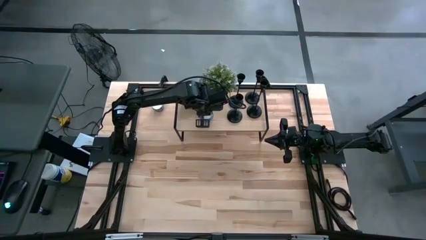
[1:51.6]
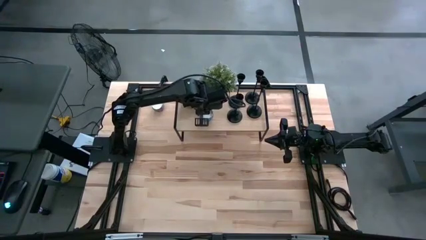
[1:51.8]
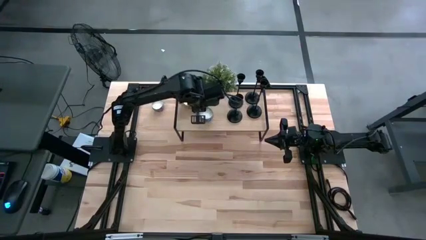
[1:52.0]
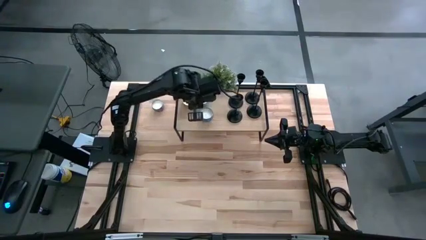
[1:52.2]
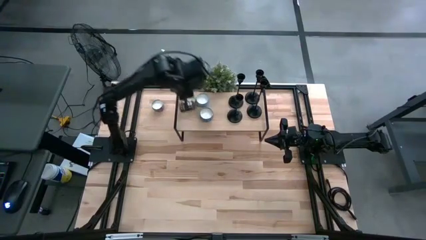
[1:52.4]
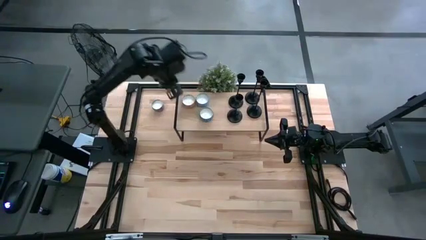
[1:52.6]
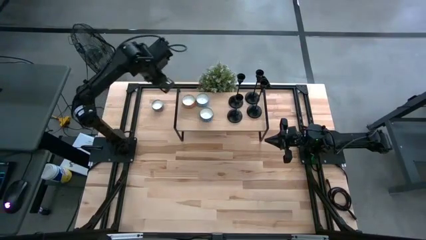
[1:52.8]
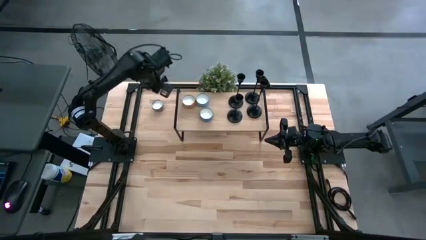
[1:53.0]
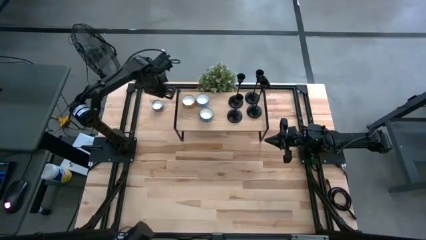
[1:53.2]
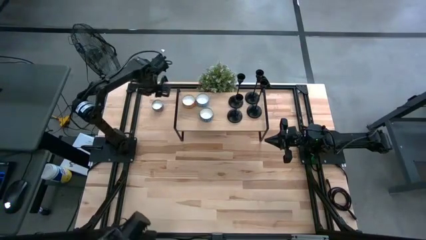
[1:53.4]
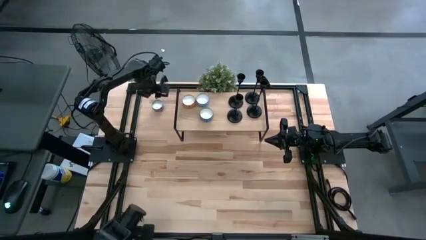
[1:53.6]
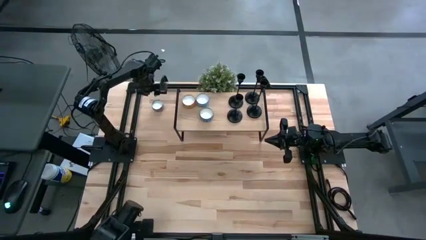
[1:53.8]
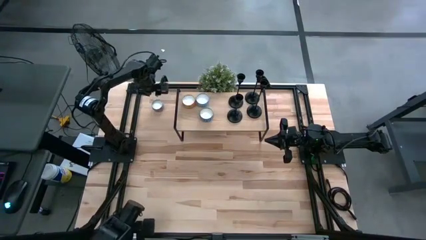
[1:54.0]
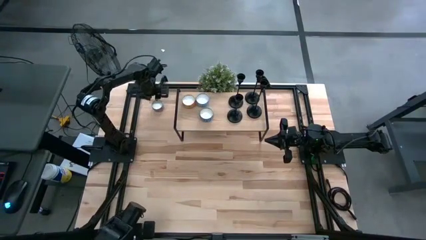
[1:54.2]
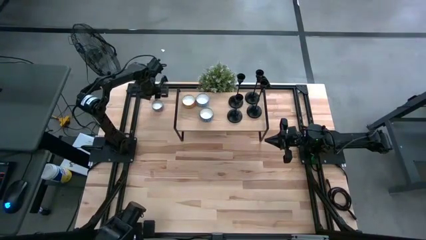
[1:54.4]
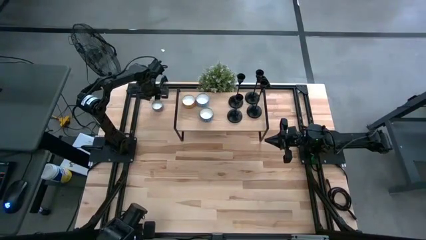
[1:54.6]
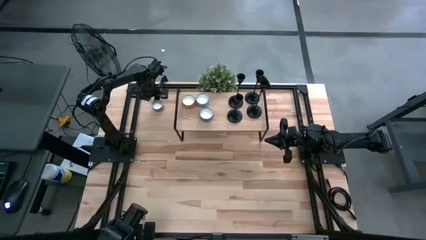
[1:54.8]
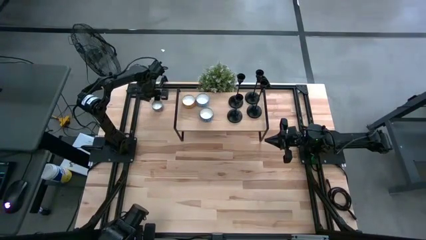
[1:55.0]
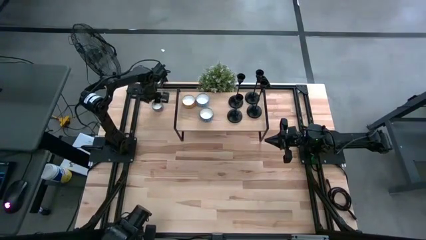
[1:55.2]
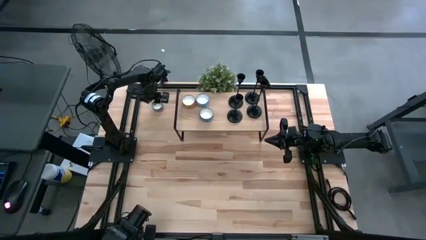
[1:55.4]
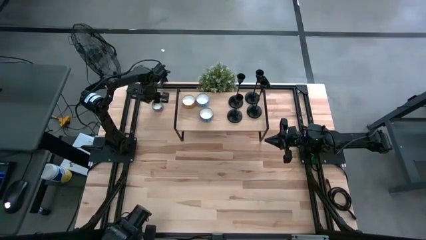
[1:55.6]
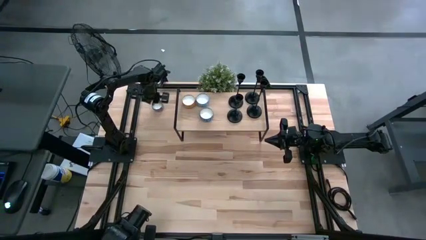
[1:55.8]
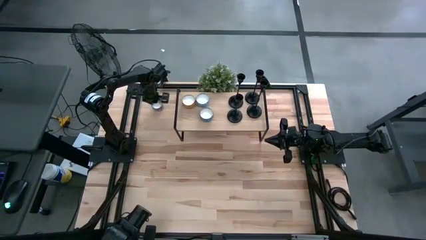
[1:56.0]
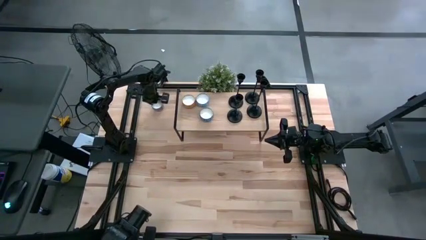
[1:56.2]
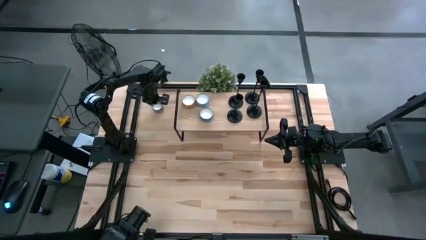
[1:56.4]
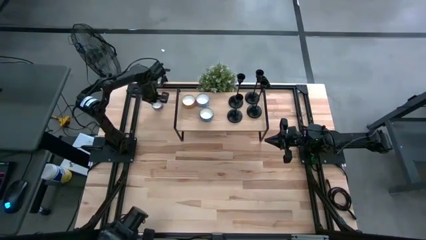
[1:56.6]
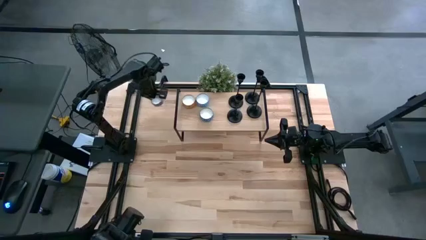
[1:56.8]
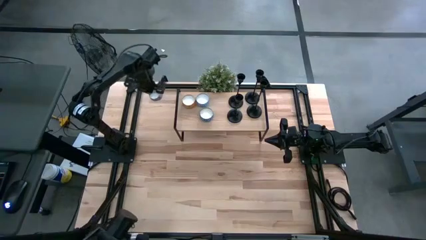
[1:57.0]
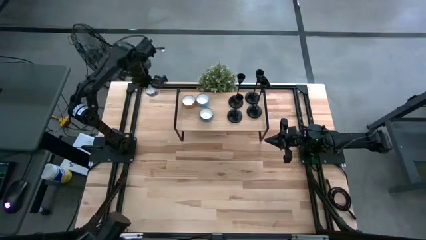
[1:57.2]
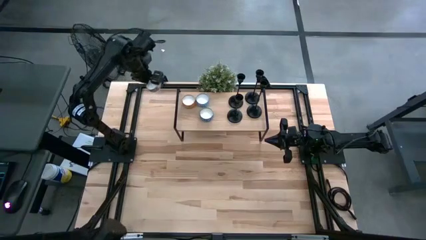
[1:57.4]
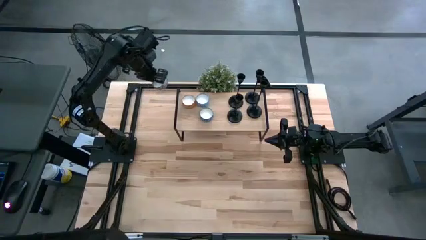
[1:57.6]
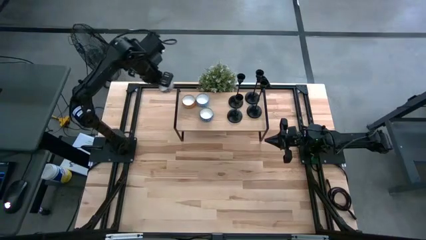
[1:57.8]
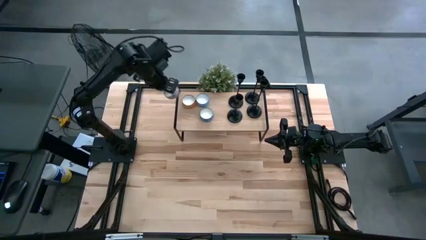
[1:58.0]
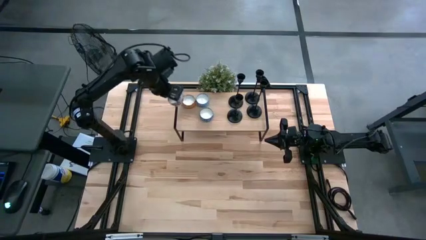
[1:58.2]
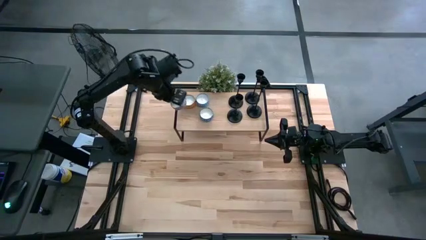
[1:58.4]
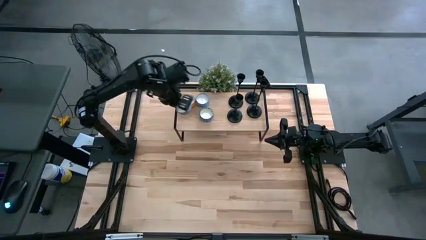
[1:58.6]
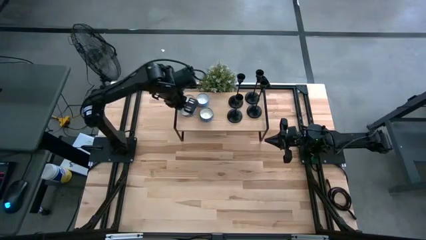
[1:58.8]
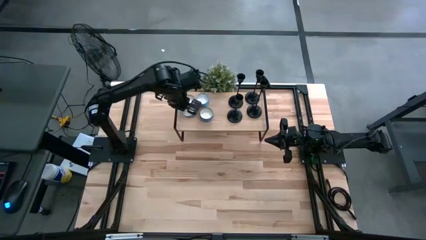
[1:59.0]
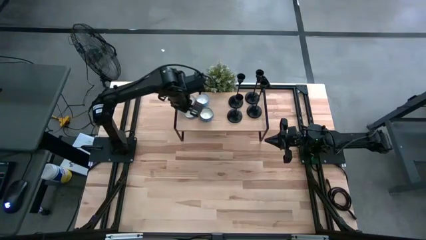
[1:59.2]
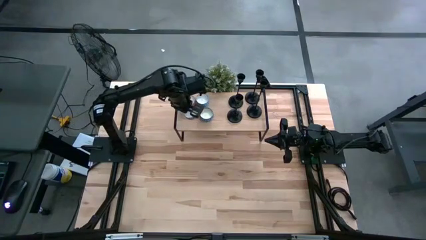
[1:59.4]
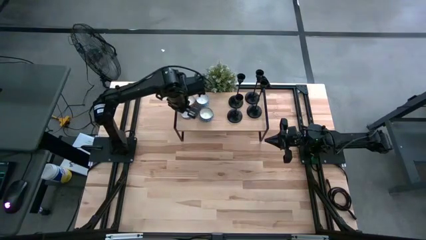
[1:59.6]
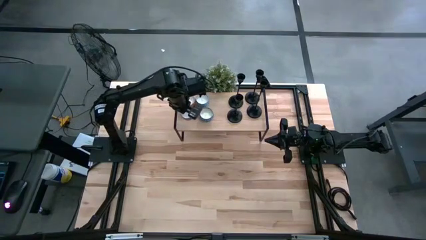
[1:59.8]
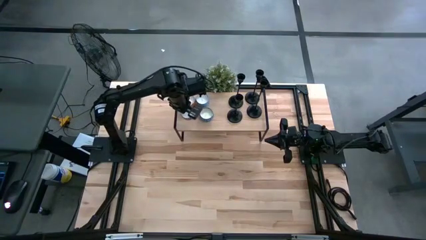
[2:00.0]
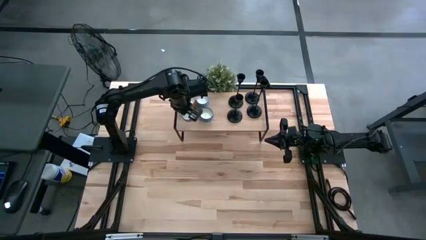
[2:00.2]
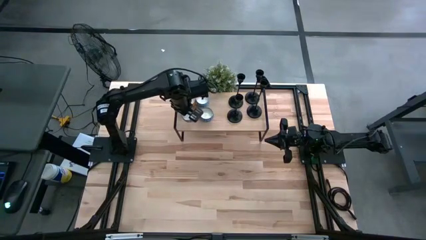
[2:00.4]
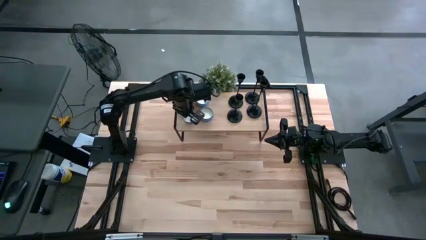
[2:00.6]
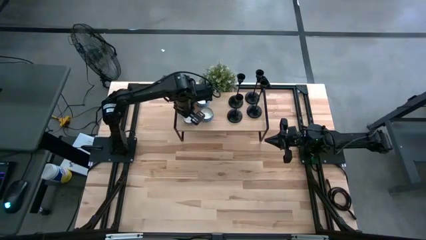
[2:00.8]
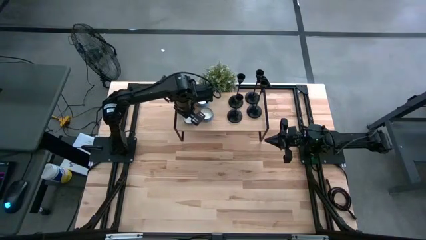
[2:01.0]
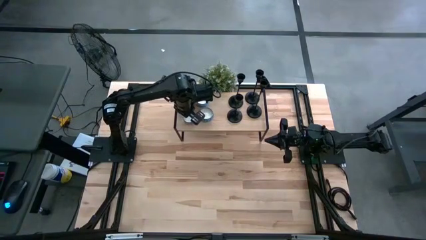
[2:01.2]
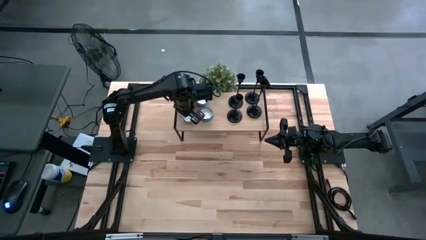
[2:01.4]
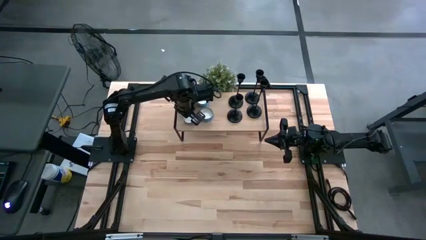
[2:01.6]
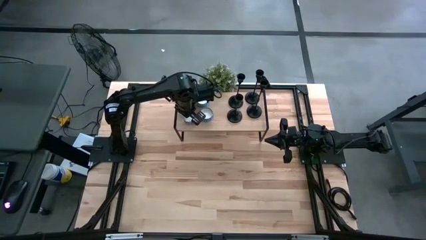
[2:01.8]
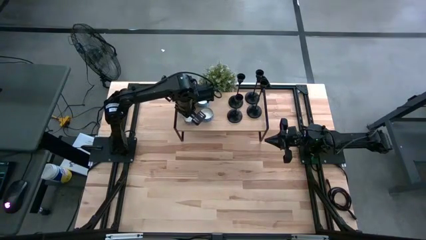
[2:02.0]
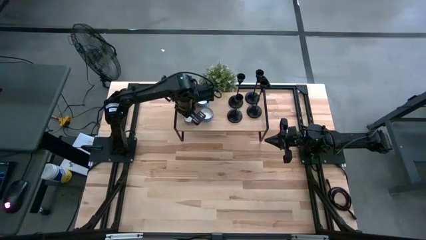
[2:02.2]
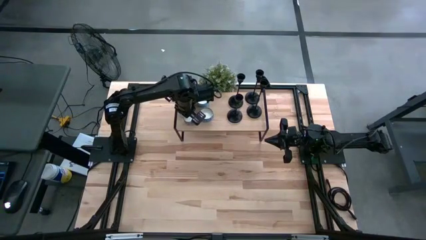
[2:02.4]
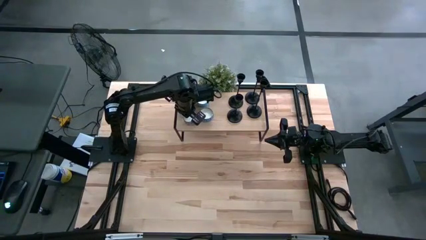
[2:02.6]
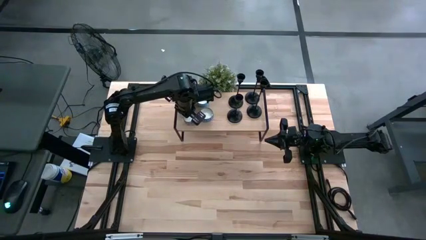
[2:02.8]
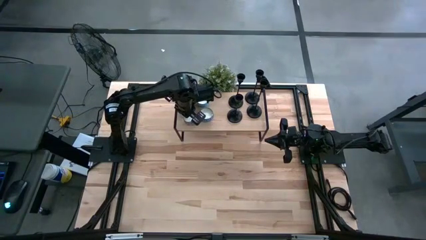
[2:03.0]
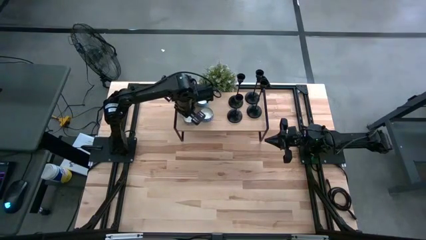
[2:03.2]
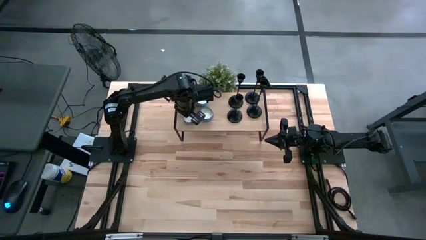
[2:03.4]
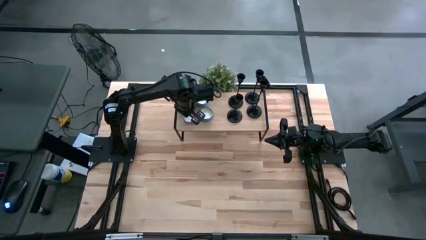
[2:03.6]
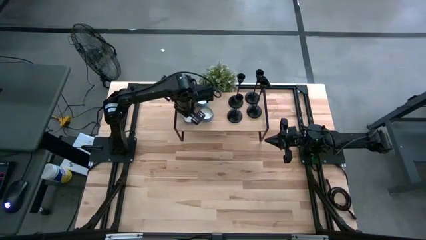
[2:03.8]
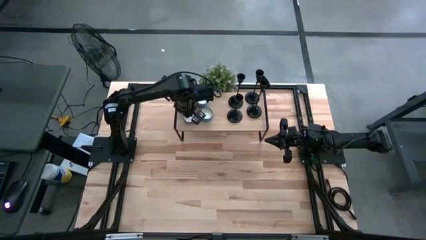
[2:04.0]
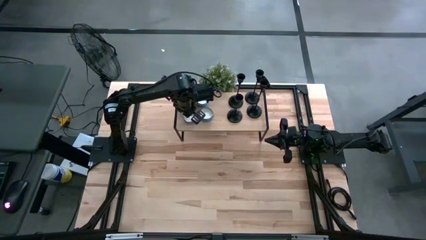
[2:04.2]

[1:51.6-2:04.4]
Task: Pick & Place candle stick holders
Put the red scented candle on the shelf

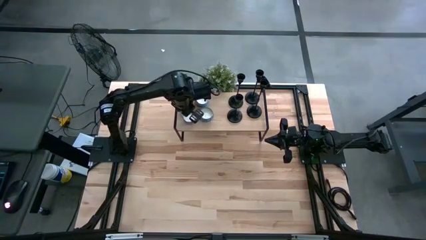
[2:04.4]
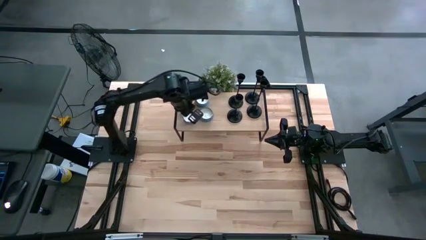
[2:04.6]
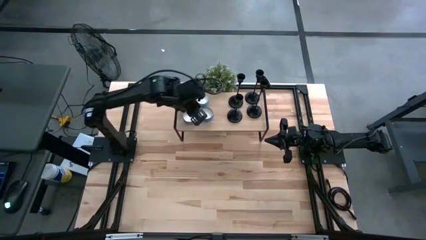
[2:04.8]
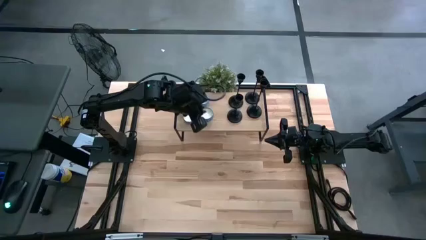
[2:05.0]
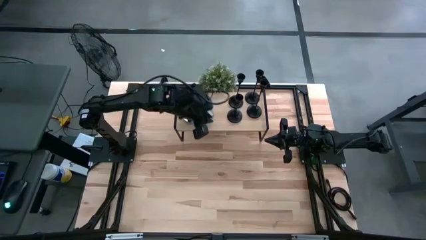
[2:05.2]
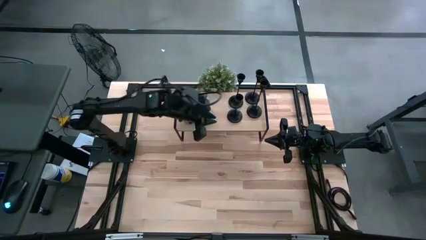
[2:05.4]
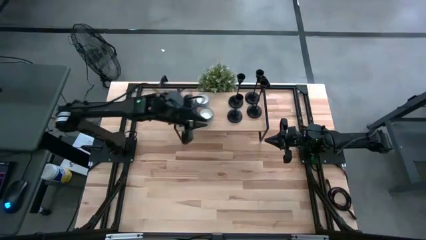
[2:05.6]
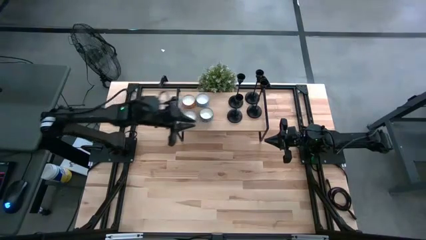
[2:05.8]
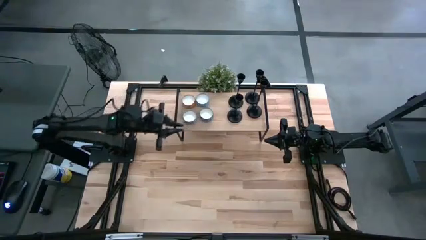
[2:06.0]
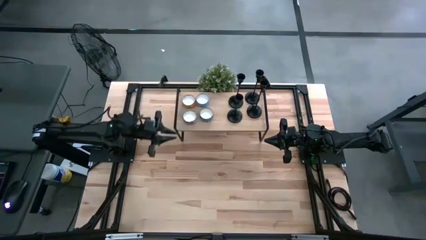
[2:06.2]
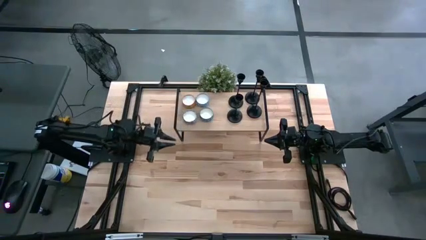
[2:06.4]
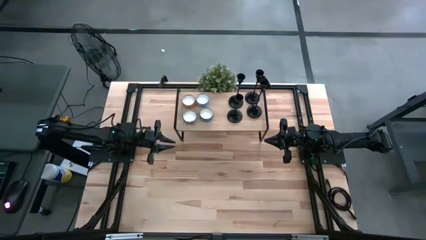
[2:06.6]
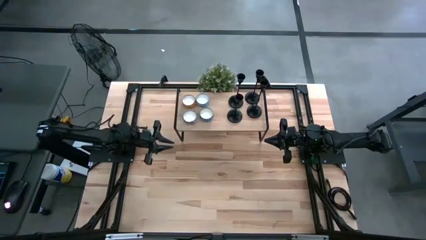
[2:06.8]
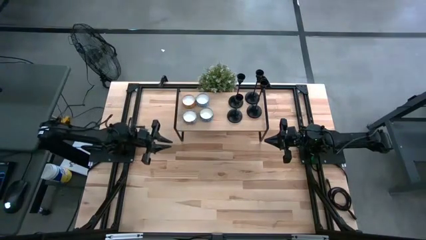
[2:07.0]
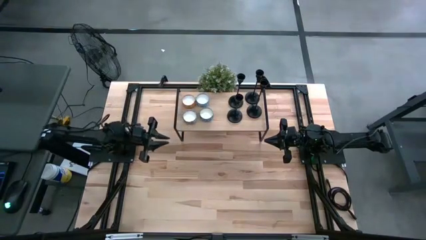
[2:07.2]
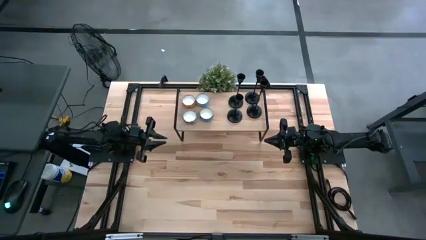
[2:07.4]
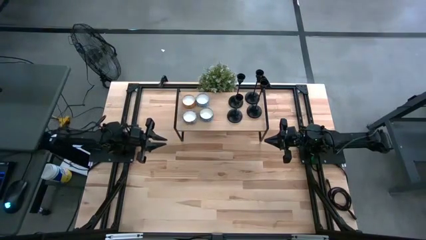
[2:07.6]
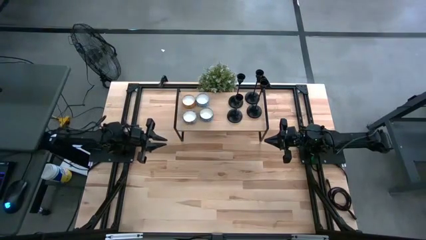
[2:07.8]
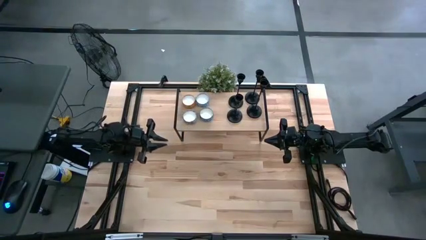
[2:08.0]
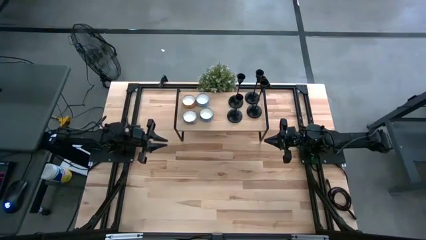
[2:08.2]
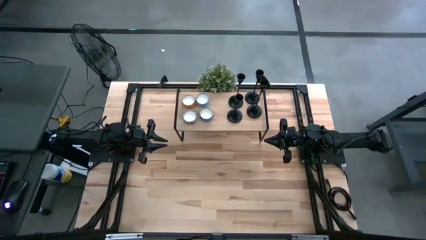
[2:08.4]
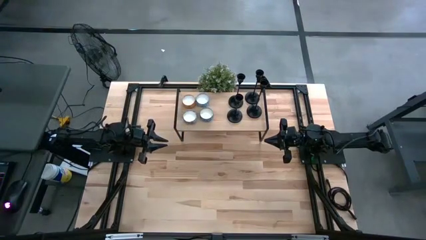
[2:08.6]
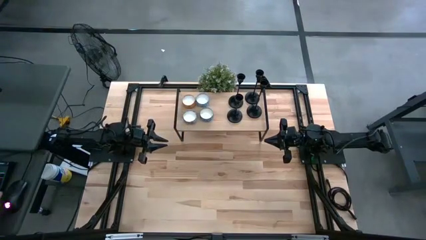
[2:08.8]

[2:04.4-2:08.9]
Return to Home Position
